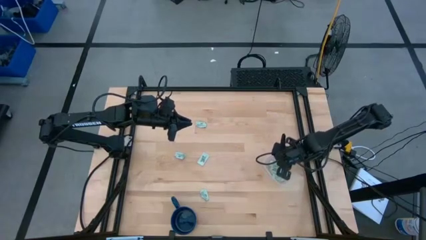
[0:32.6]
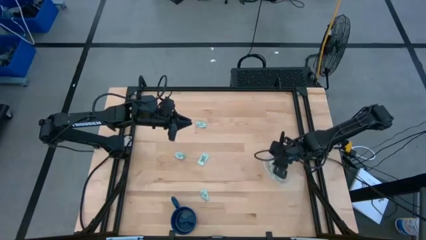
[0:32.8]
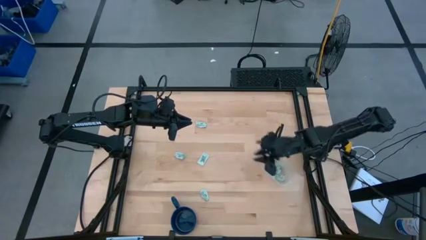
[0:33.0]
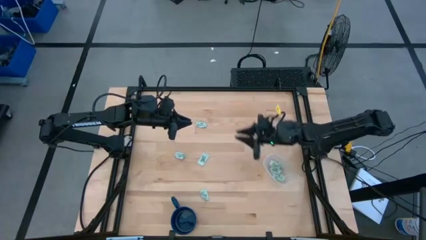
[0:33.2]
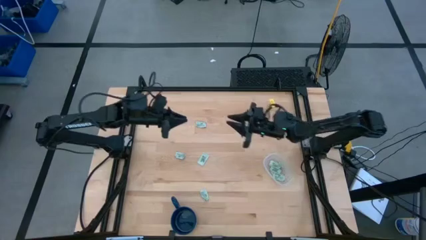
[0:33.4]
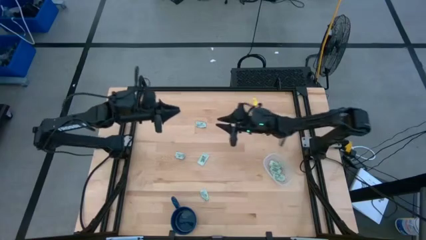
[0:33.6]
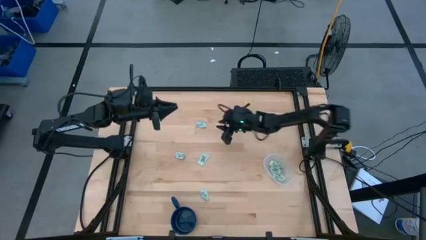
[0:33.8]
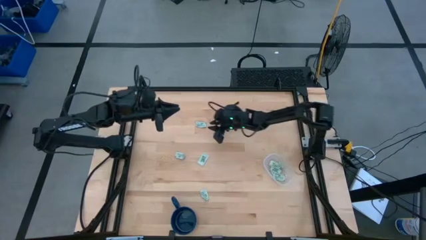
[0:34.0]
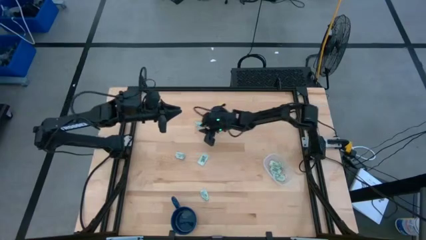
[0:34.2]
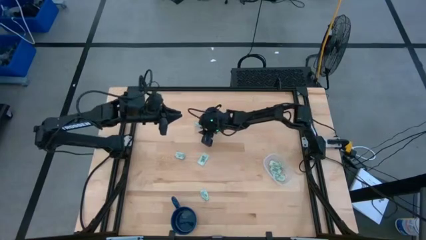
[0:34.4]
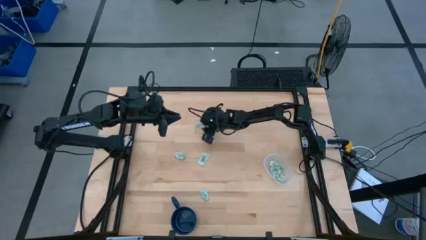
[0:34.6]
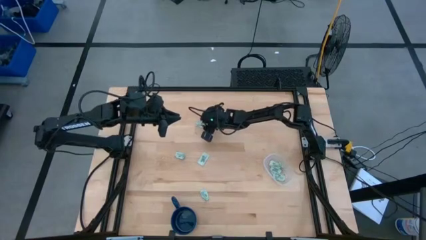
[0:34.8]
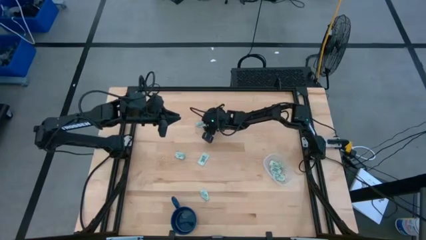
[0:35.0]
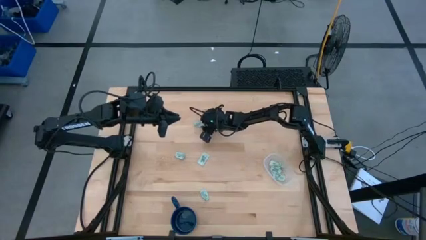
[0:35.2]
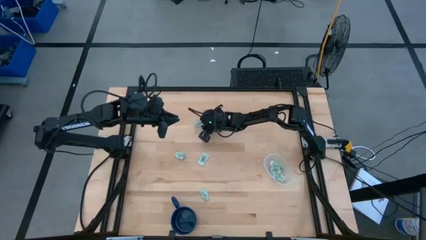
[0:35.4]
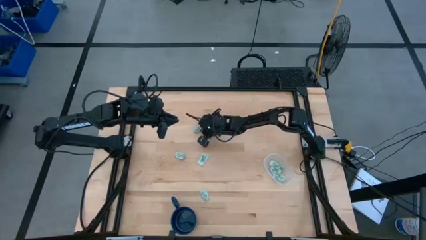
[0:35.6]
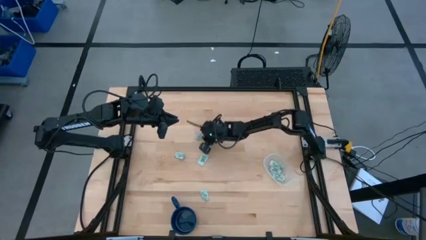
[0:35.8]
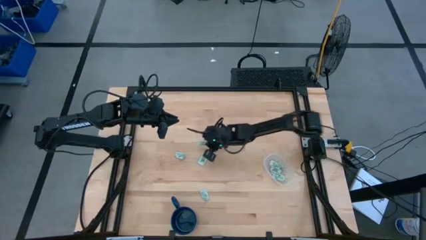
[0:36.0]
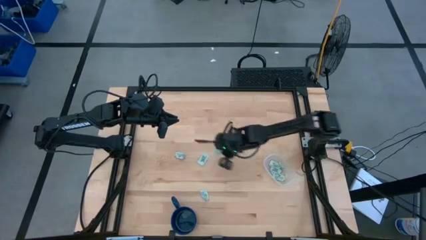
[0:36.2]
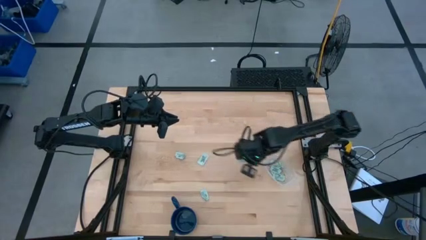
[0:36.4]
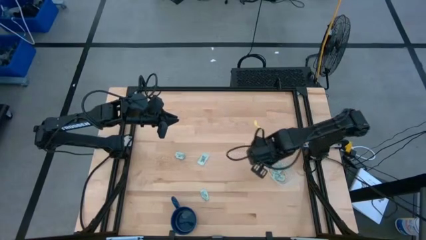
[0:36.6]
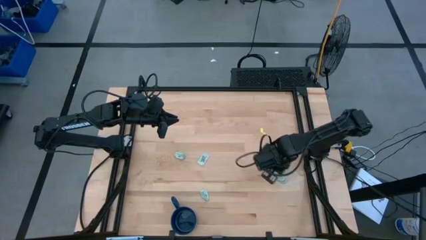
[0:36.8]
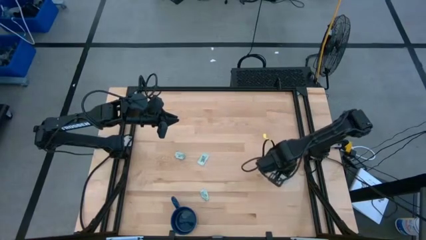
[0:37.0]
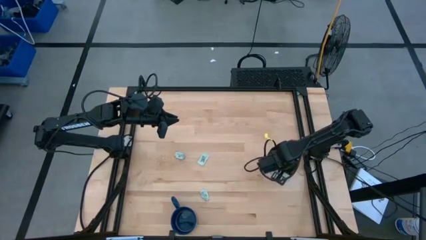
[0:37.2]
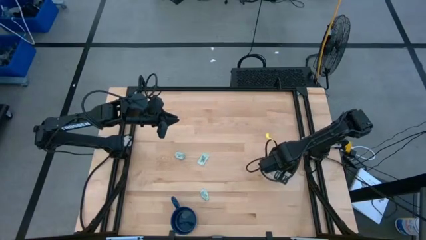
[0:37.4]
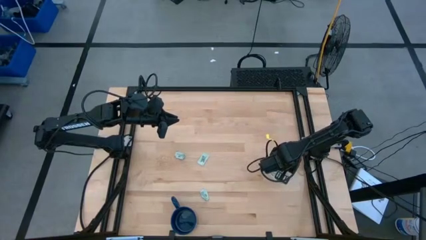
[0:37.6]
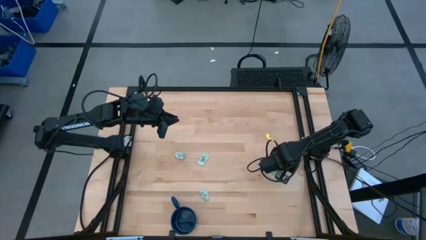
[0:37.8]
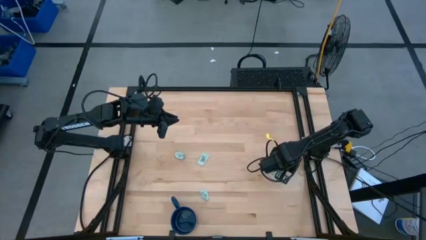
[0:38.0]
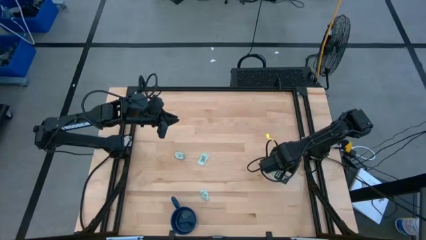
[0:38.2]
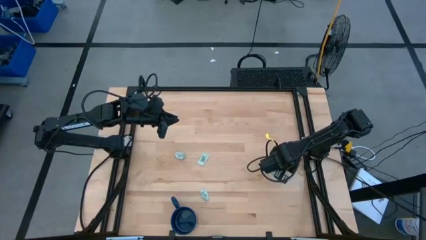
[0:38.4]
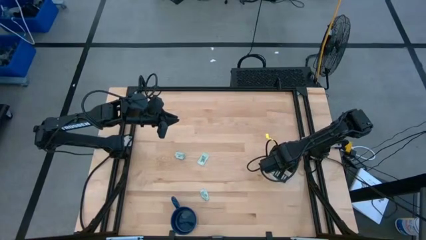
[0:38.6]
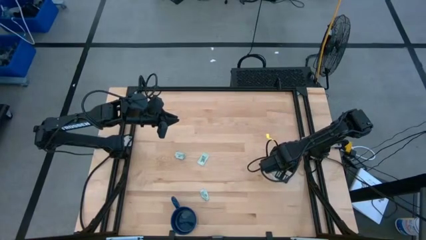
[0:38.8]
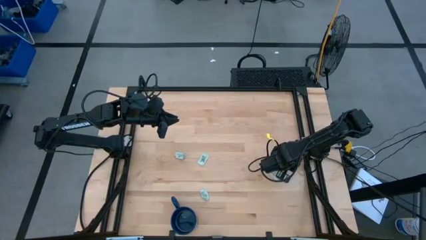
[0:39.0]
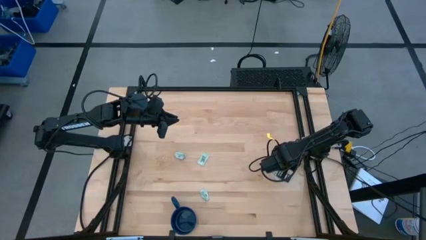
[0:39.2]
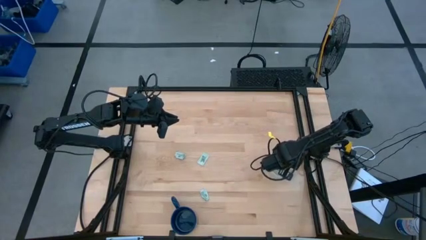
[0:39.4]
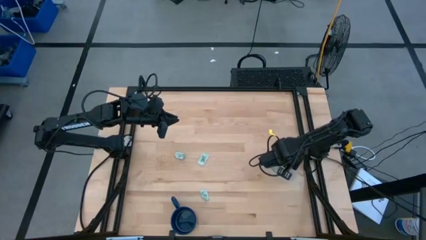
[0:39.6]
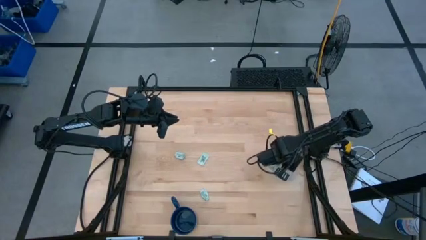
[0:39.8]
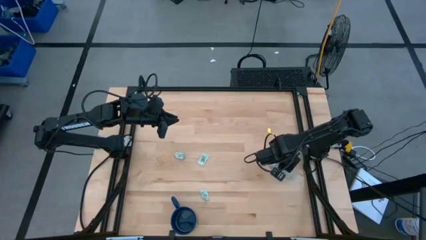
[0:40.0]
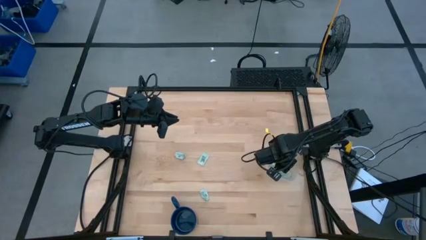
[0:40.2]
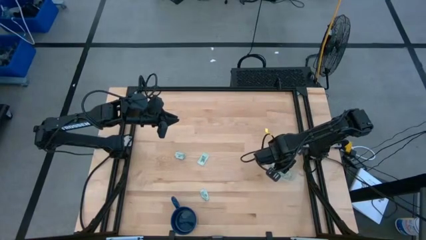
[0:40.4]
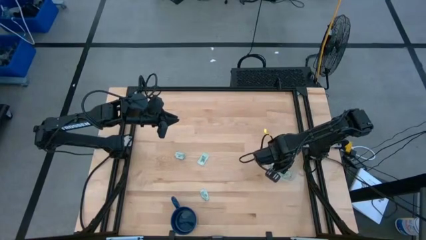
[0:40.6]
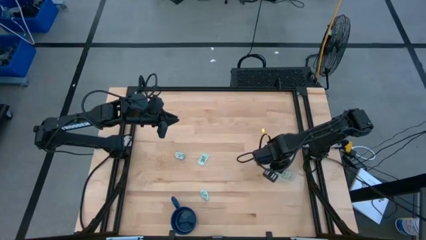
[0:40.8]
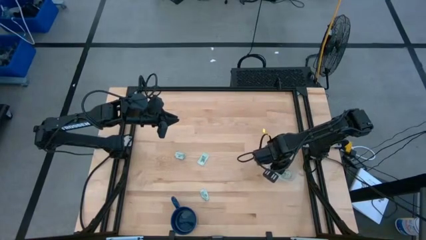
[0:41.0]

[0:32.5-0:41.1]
Task: Pick and place Stevia / Truvia into bins
Put the green stevia packet into the transparent container

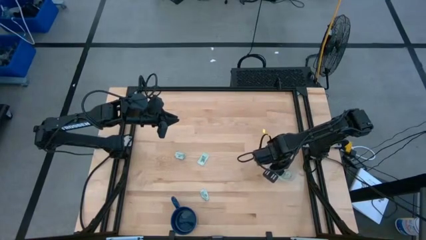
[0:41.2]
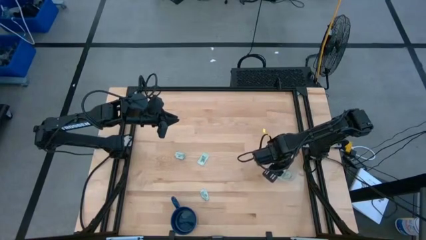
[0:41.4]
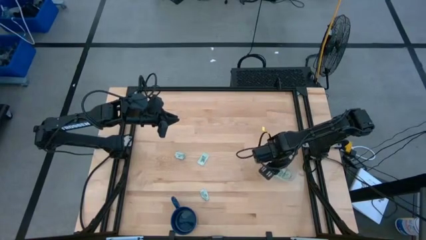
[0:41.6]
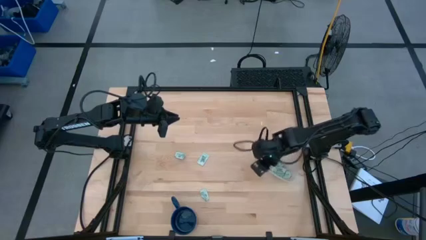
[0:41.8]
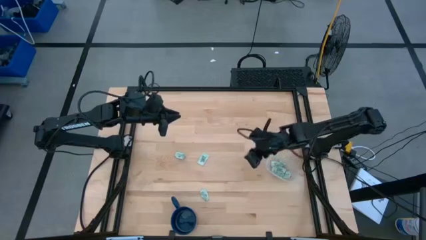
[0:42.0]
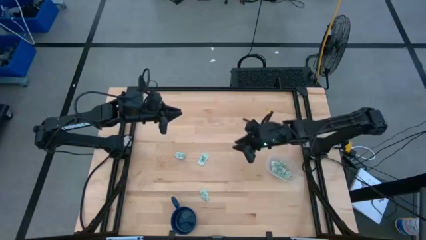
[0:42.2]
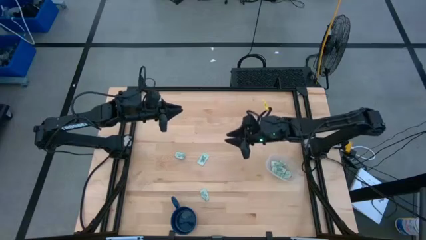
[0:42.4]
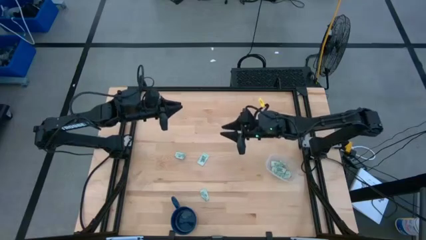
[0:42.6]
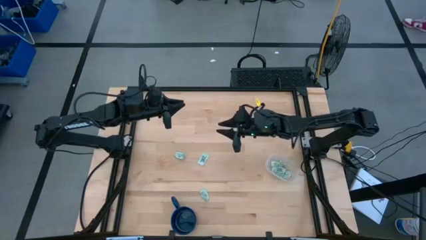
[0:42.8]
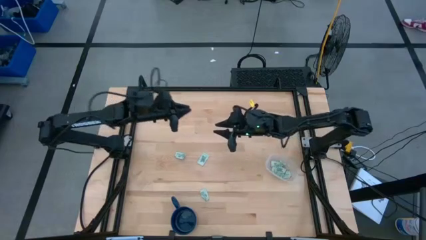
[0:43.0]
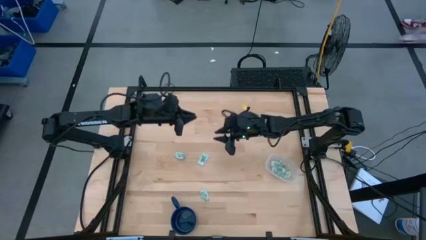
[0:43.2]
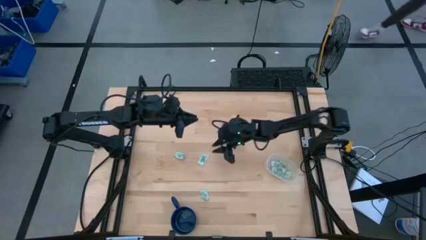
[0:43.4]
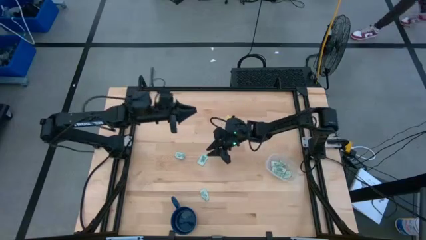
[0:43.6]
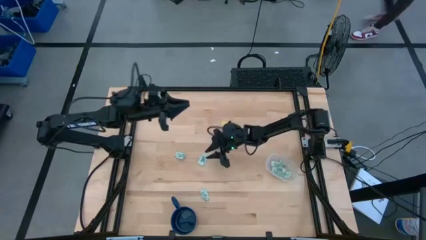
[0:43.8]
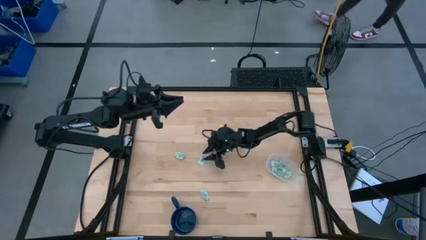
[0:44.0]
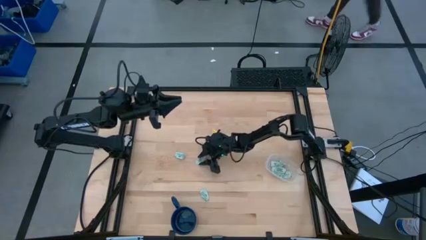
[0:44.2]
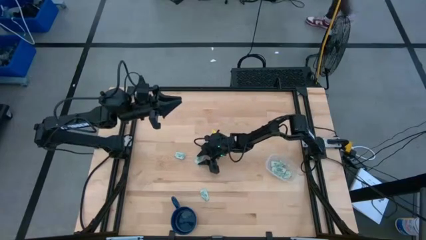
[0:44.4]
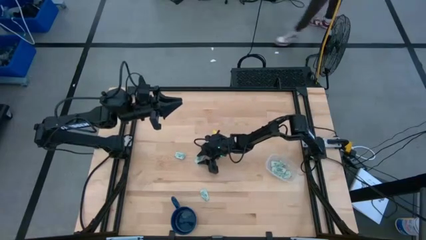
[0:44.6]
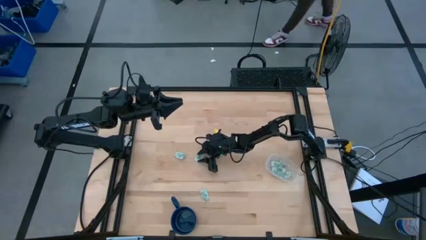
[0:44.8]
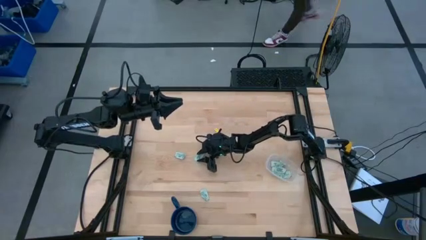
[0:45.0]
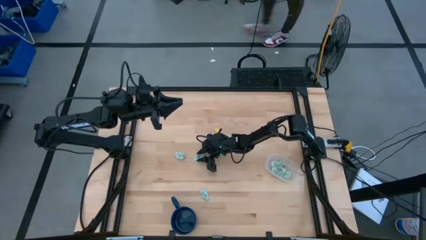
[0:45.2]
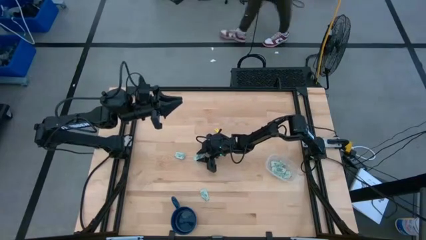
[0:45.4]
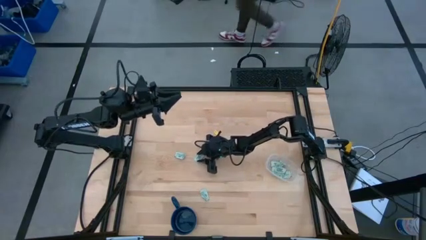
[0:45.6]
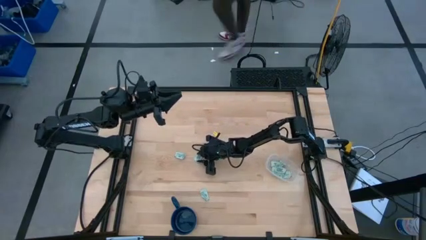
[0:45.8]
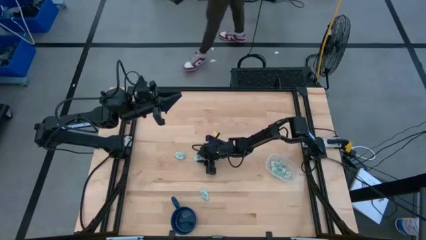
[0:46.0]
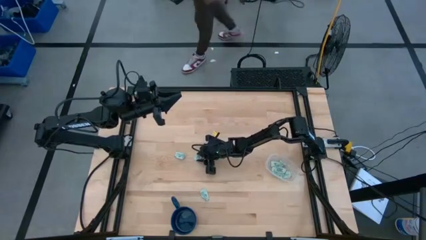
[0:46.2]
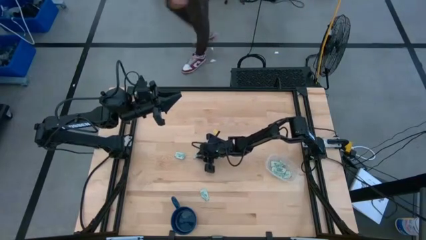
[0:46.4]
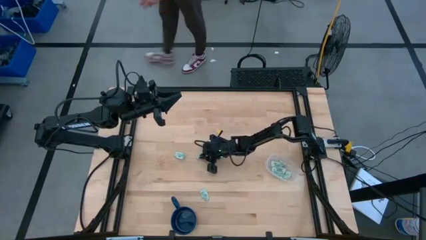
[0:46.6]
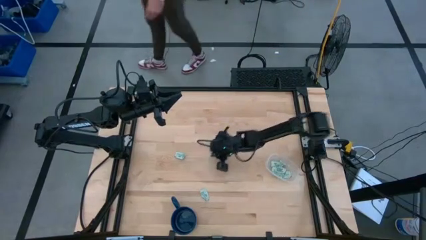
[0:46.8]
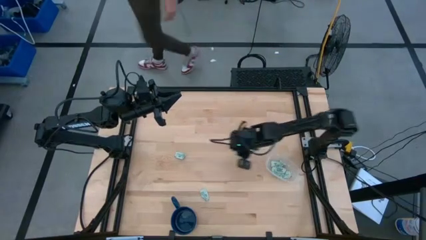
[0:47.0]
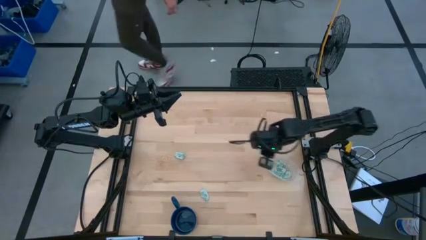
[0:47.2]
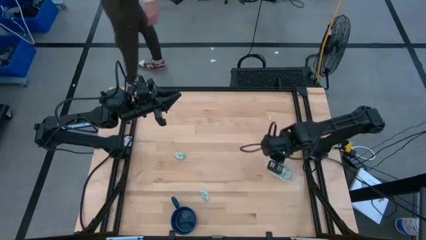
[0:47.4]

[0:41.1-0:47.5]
Put the green stevia packet into the transparent container

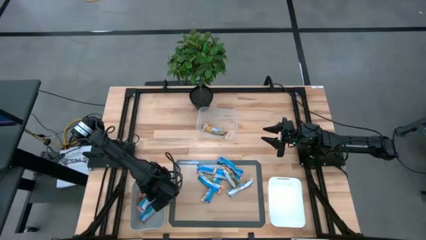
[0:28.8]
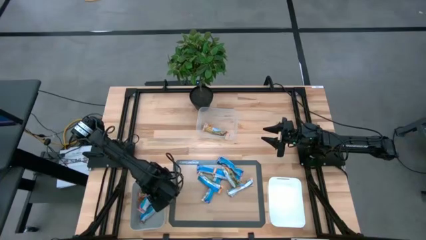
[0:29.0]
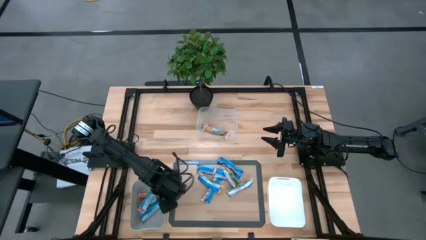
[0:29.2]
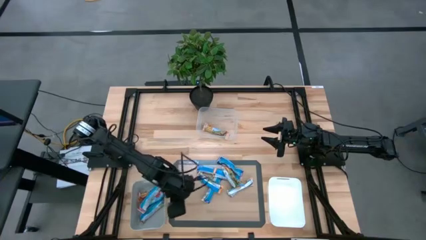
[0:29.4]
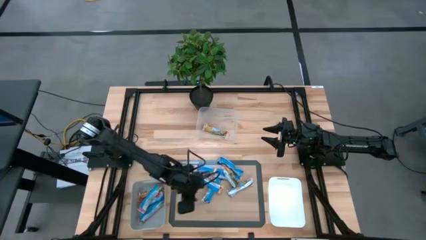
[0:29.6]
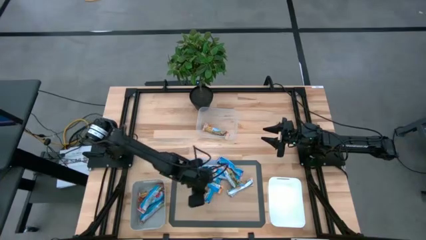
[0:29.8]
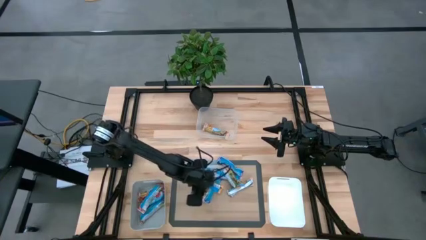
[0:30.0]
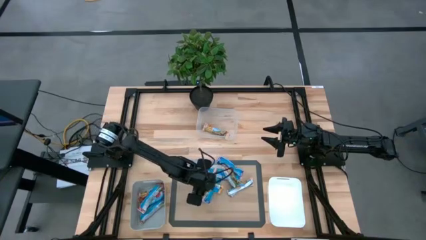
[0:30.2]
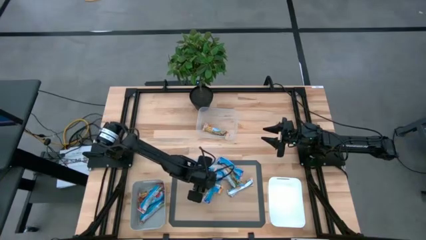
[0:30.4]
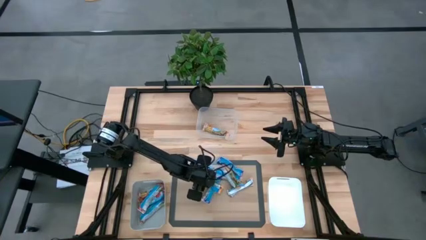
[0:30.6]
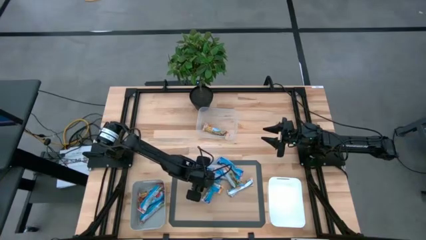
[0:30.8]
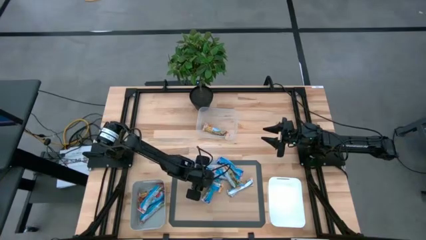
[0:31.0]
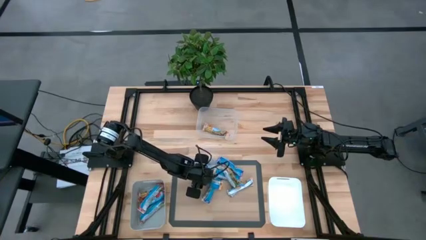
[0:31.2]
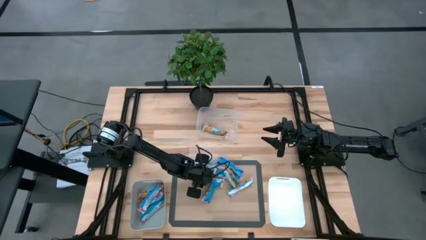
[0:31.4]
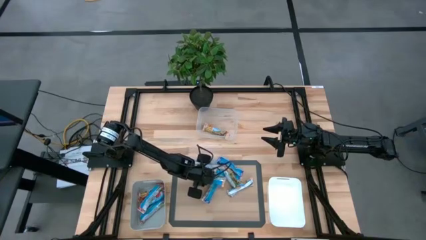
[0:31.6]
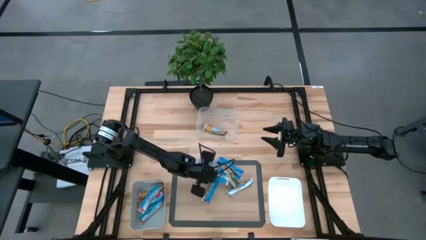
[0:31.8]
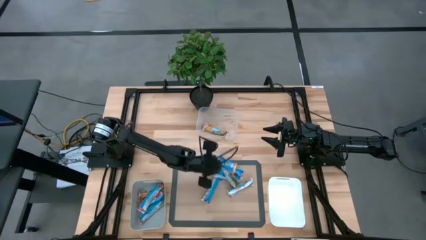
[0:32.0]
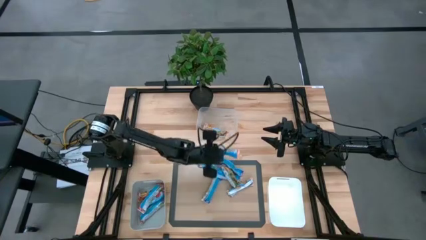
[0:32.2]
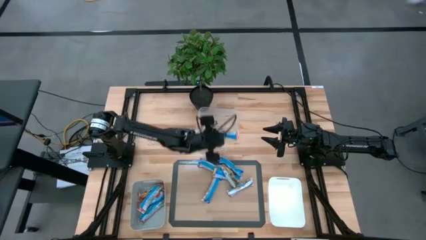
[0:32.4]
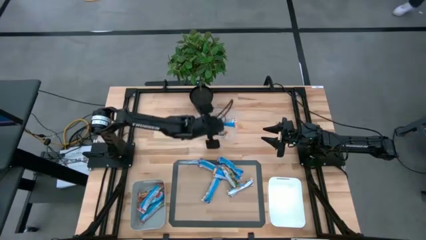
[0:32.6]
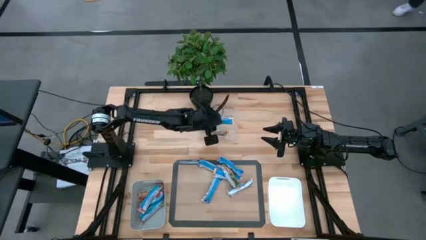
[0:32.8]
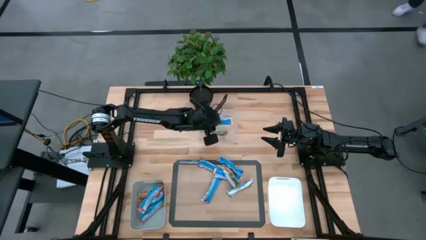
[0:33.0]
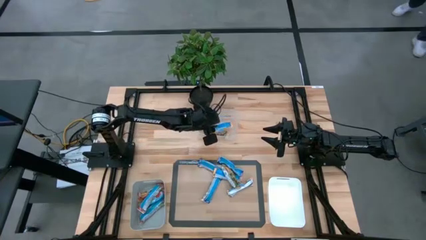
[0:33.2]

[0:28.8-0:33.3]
Task: Pick and place Granola Bars by type
Put the orange granola bar into the transparent bin
